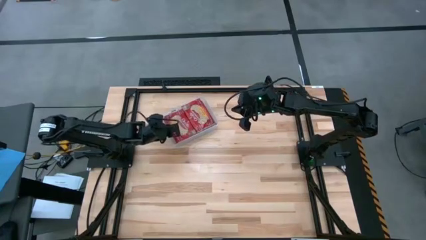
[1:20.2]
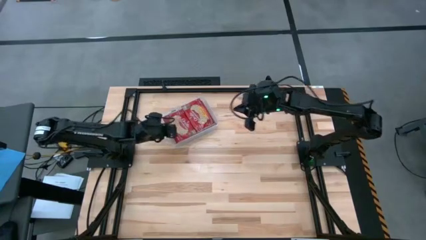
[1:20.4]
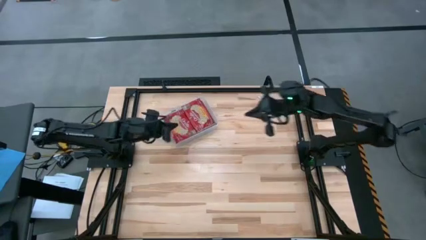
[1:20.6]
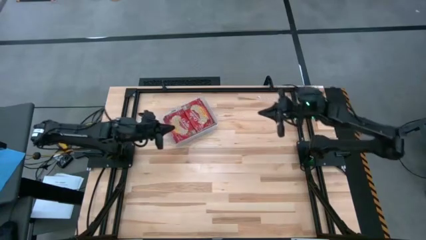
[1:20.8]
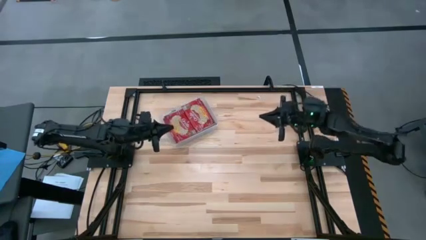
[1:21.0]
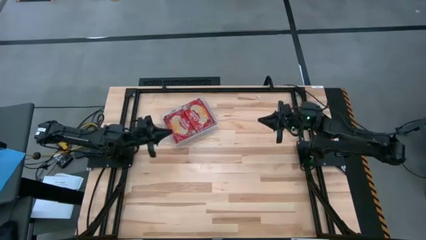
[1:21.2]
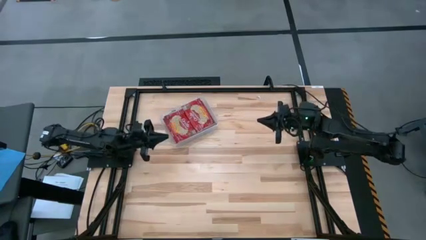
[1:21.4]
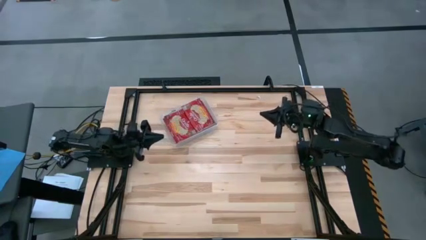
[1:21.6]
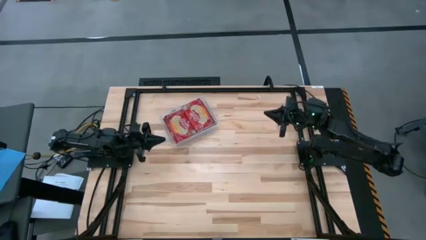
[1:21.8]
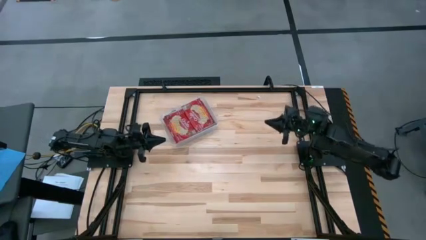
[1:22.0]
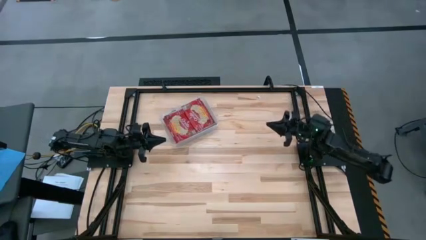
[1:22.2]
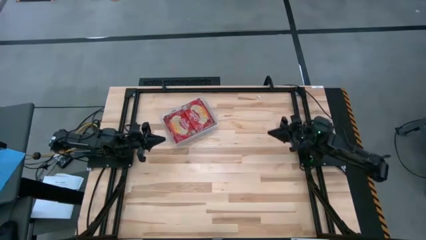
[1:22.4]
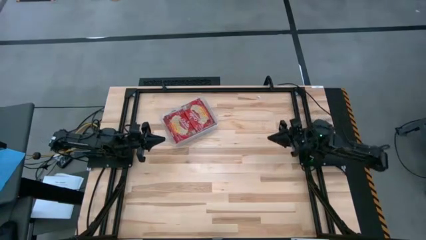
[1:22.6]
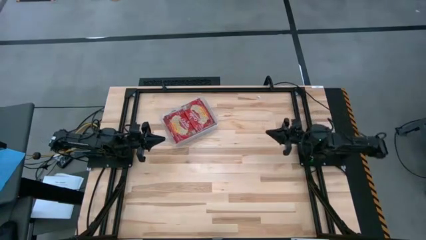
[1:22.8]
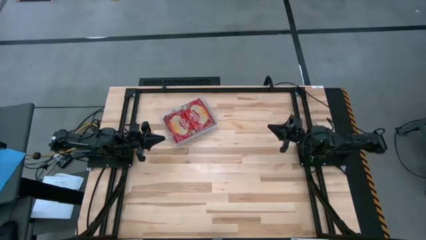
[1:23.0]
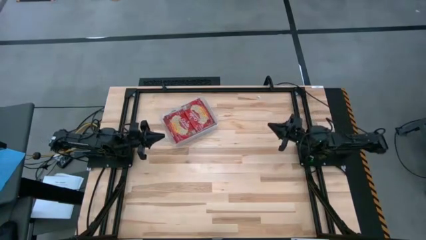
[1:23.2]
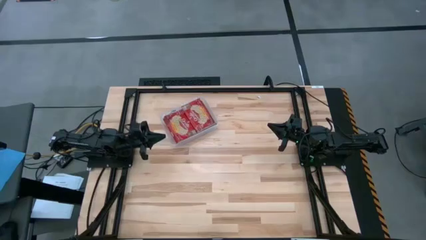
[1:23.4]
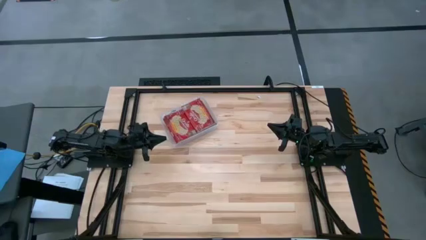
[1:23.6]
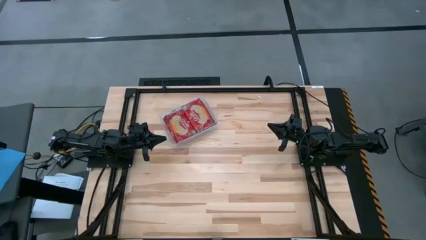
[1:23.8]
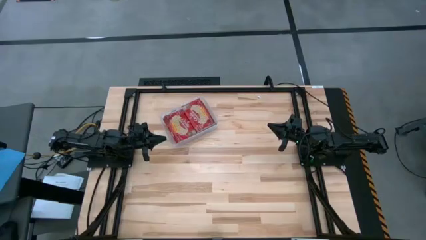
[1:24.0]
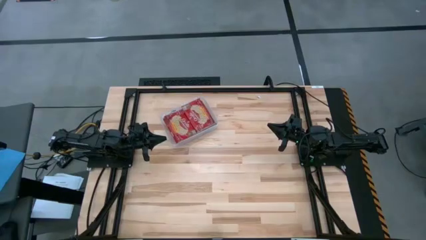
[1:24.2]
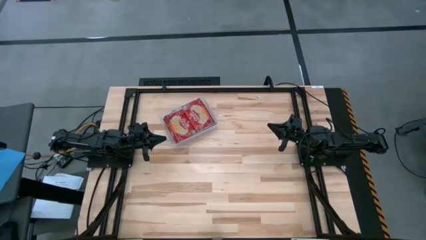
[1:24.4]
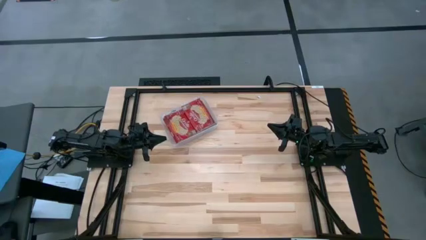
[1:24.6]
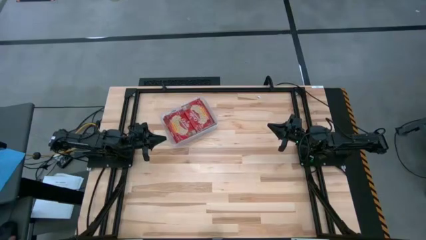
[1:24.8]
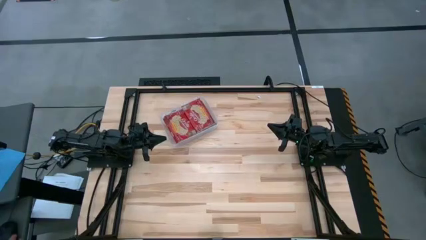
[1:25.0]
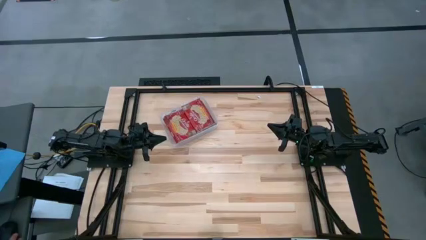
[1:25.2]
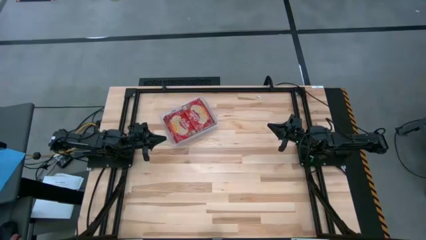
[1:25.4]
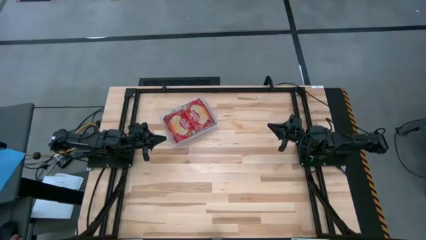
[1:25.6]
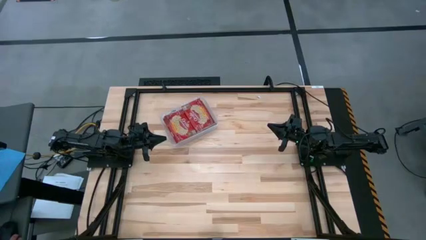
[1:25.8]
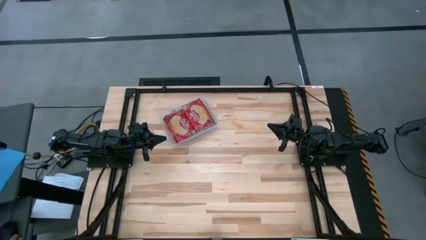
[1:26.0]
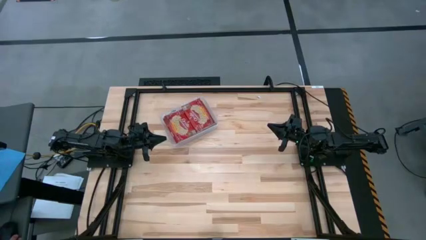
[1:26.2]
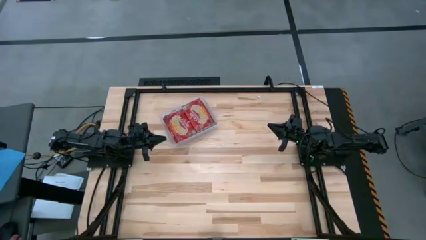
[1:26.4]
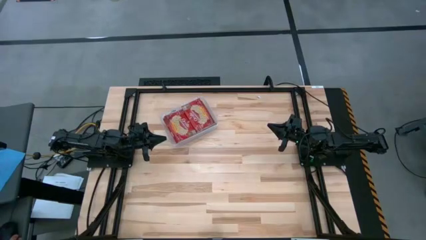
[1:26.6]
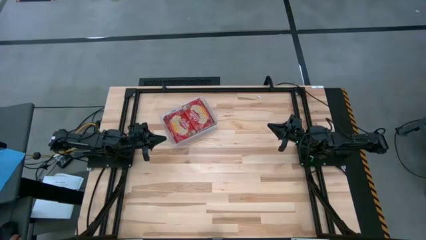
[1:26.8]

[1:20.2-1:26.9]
Task: Sort popcorn bags into baskets
Return to Home Position

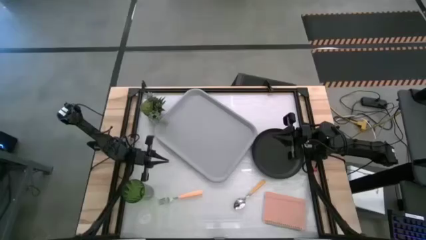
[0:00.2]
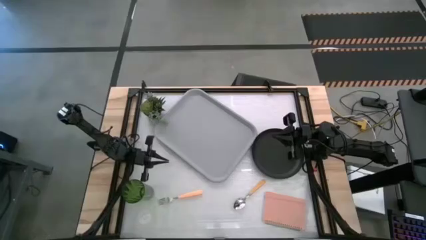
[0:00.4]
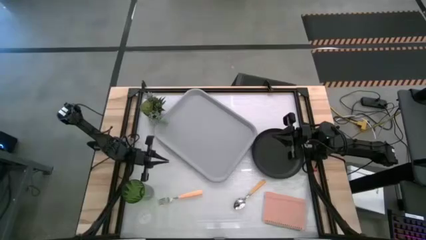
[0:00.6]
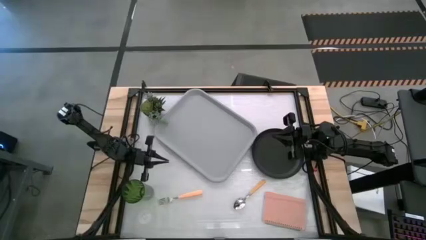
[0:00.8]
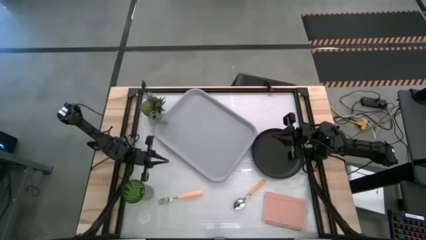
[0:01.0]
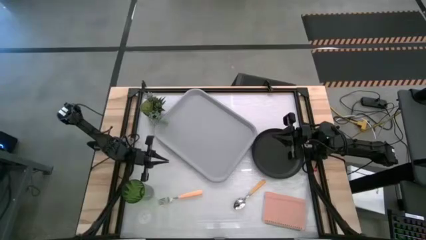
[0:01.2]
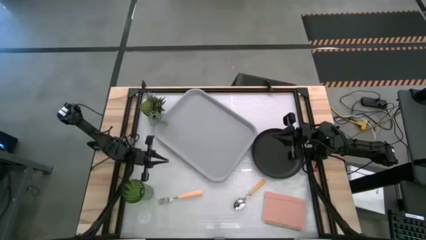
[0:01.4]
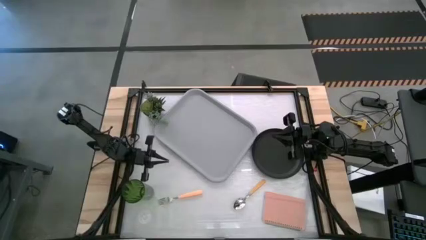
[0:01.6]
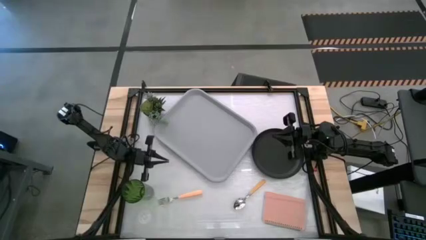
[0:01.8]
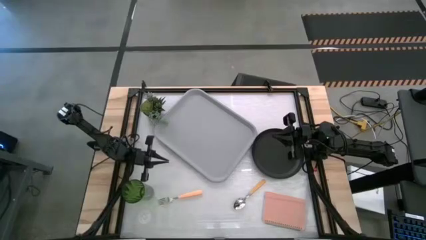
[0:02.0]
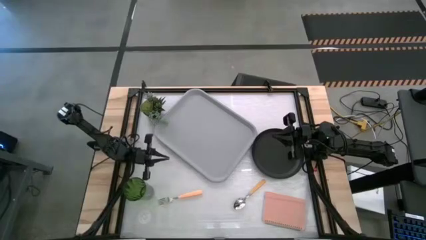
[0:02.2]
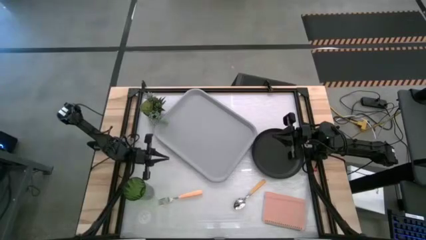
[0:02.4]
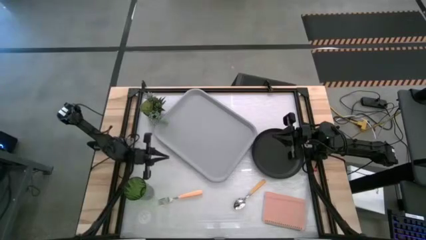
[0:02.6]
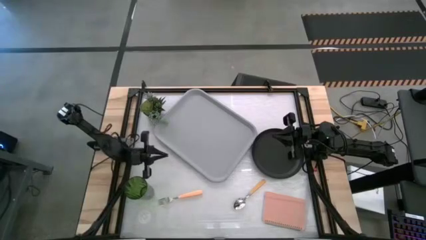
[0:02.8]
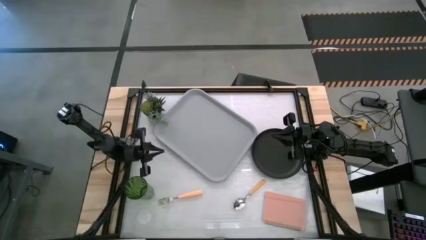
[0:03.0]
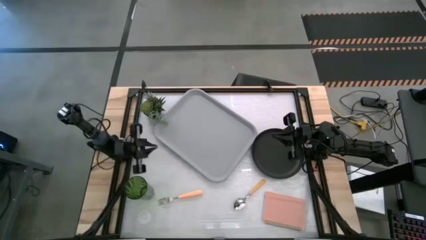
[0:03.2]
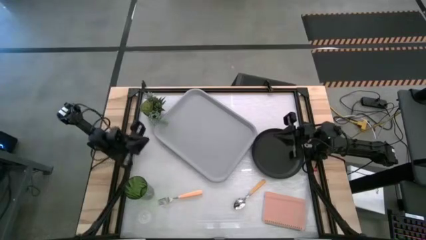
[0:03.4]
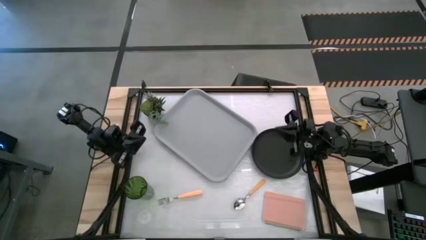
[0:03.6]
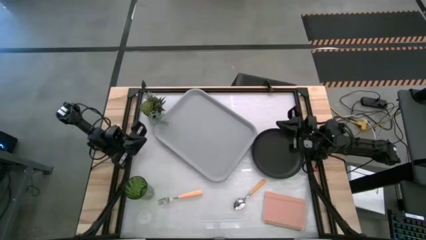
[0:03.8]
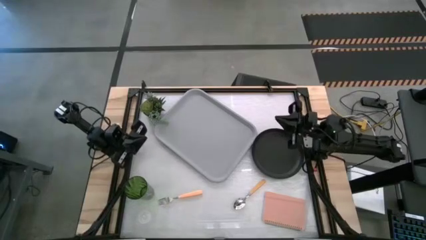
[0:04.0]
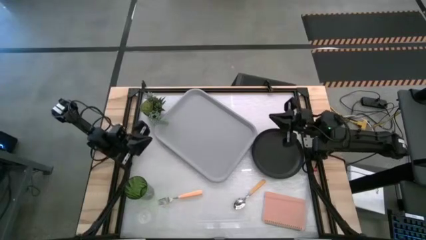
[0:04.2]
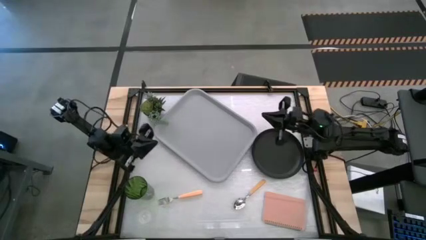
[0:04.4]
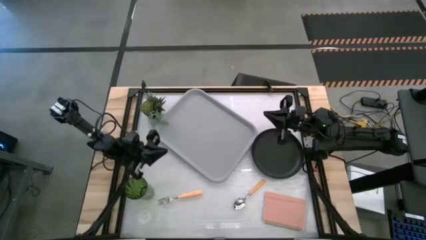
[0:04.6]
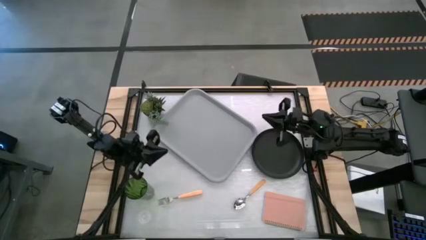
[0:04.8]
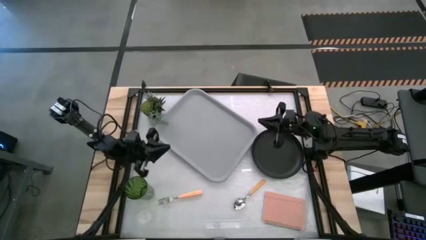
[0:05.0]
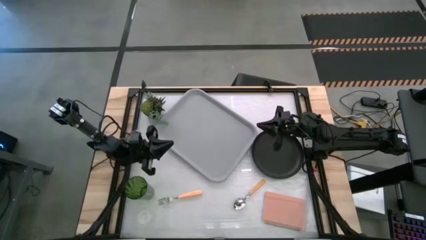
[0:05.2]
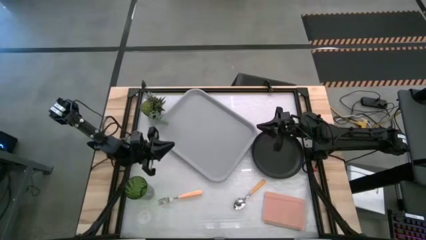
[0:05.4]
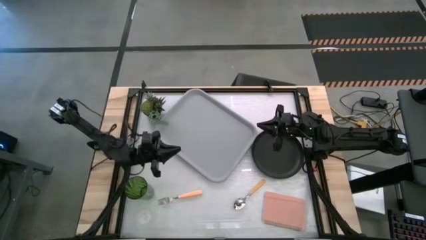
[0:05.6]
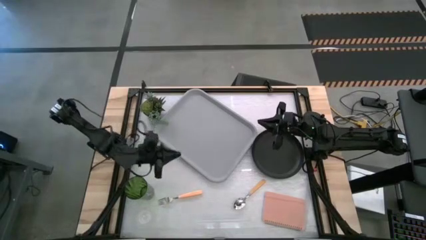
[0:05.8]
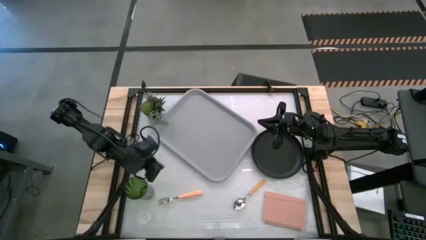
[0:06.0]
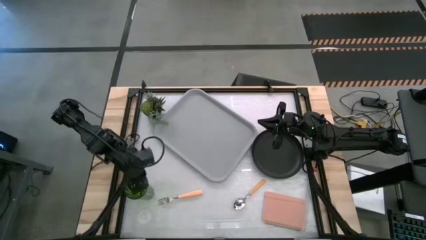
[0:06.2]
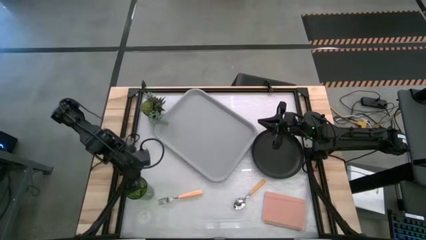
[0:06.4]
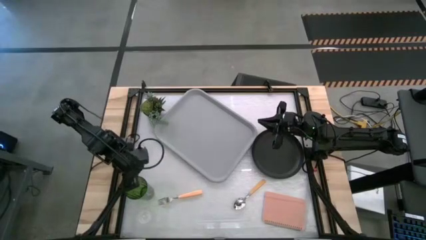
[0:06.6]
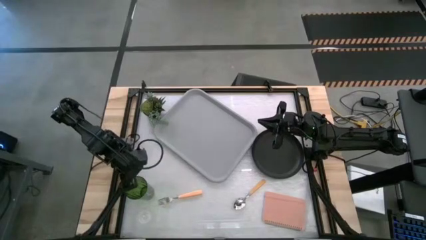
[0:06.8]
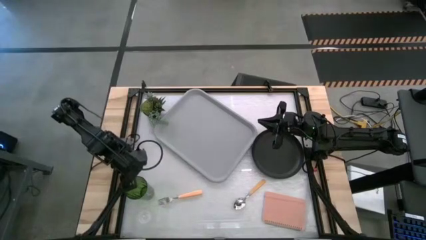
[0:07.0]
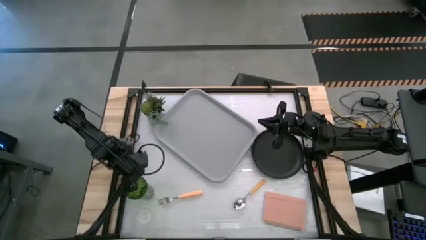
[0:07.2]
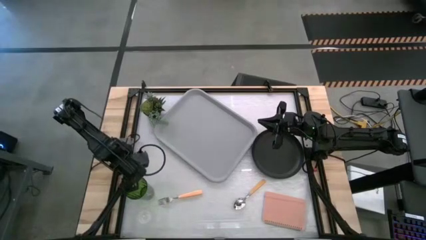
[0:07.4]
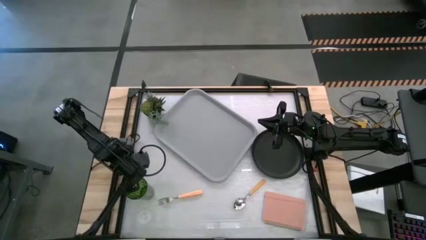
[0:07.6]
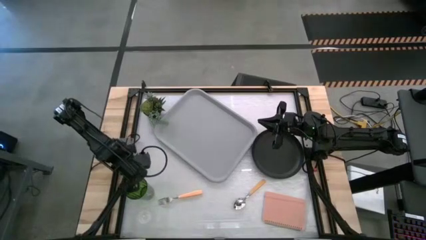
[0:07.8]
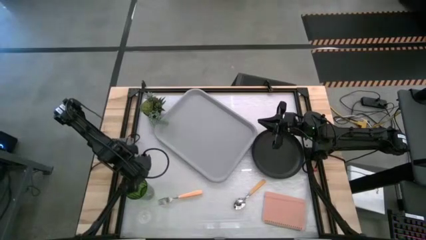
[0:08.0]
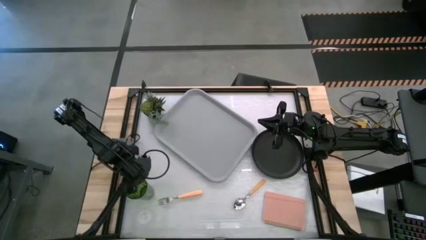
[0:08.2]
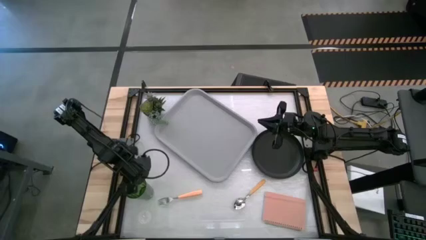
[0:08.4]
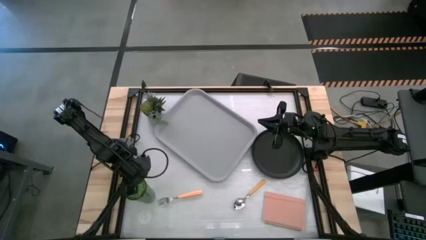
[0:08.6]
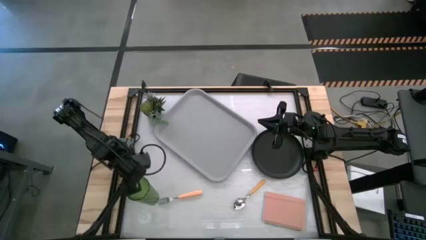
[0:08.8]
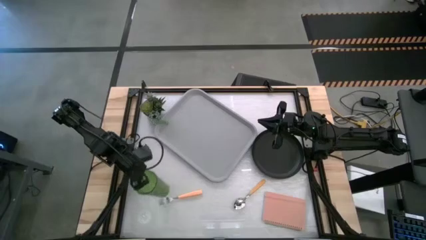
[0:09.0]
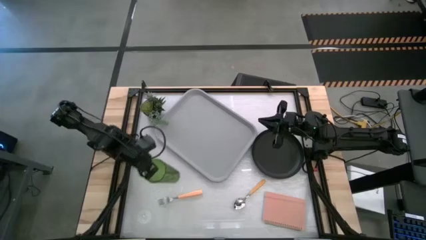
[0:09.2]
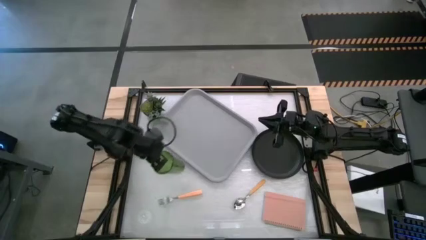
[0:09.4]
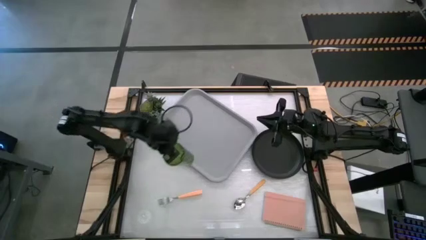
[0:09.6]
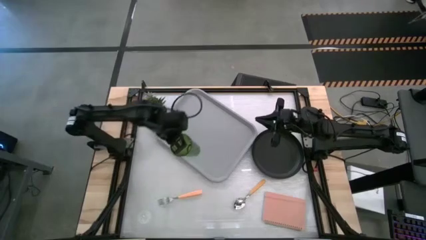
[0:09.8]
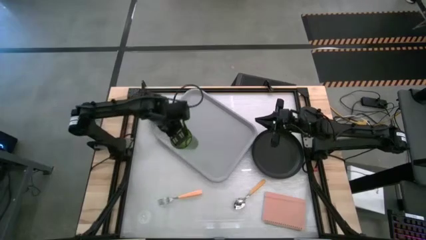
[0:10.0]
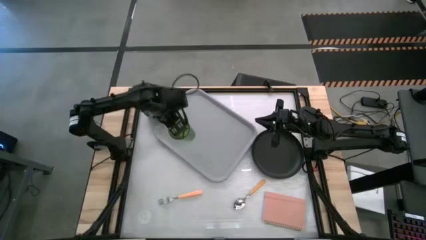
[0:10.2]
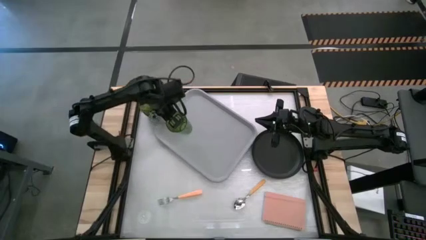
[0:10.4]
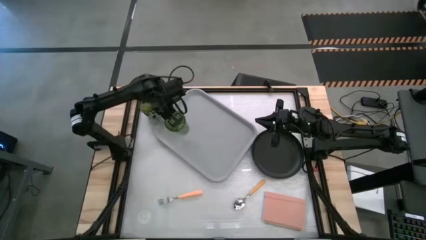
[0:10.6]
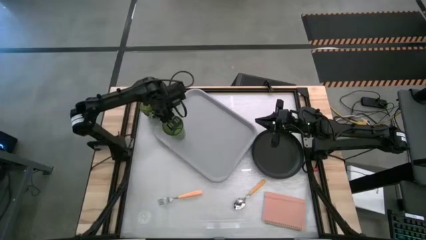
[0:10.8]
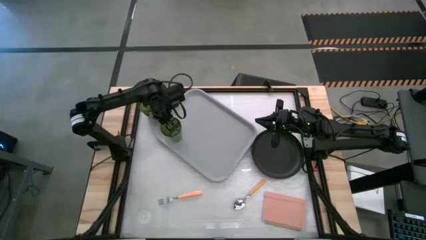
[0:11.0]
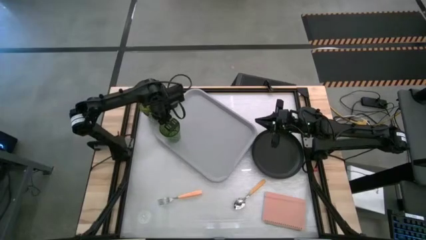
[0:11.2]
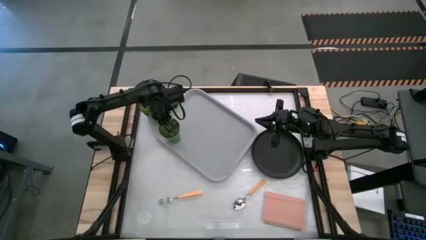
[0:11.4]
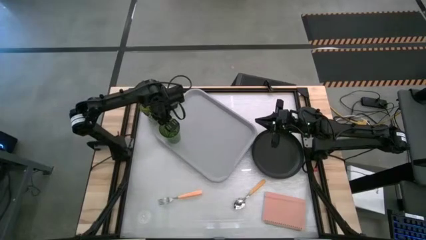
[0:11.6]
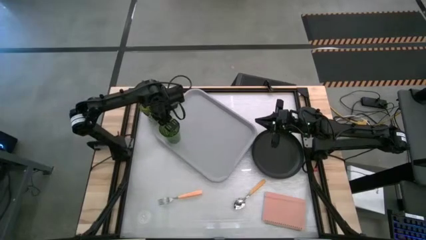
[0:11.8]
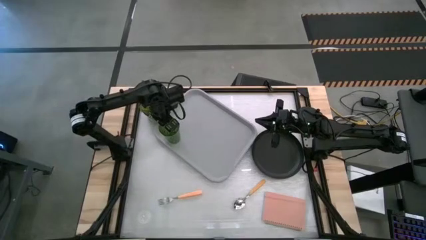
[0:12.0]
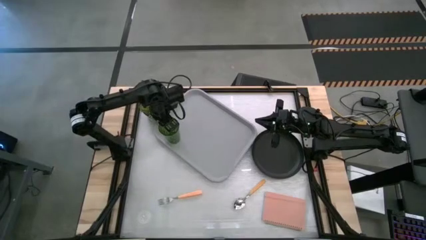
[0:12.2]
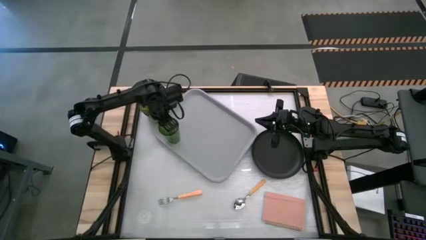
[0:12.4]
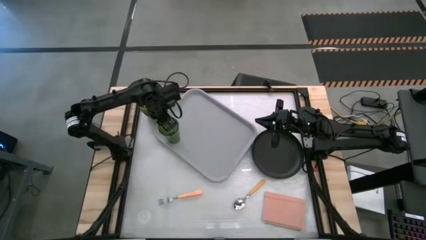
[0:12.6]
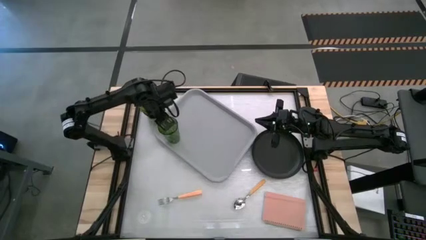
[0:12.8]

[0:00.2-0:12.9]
Task: Pick and place plate/cup/fork/spoon on tray
Put the green glass on the gray tray
